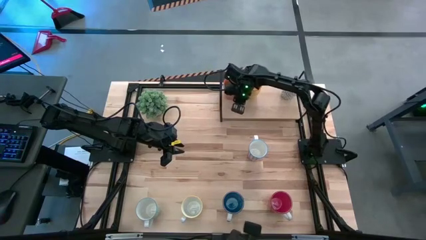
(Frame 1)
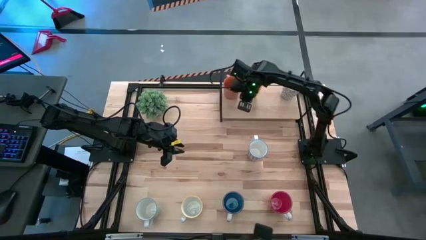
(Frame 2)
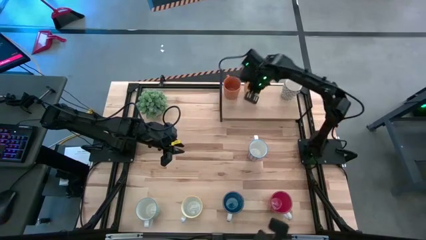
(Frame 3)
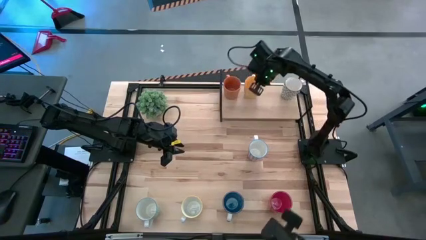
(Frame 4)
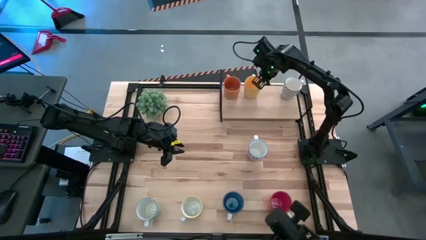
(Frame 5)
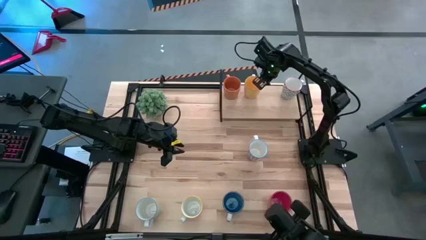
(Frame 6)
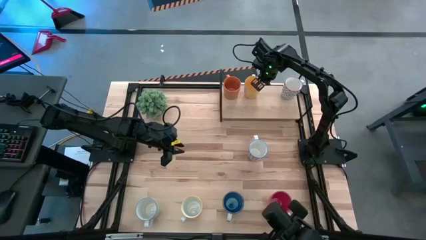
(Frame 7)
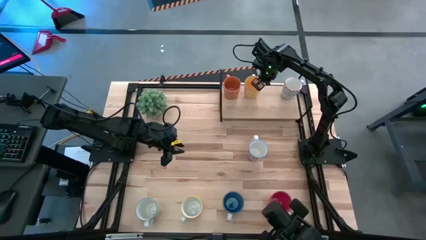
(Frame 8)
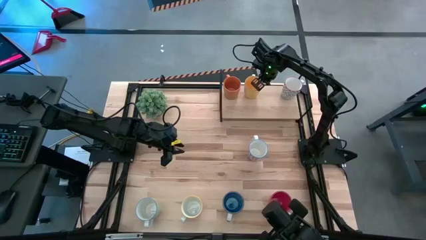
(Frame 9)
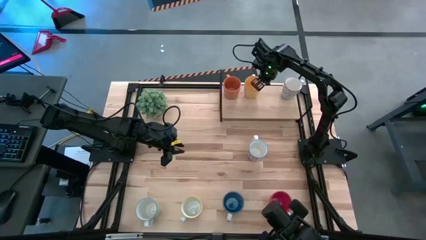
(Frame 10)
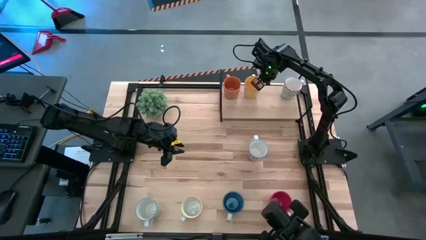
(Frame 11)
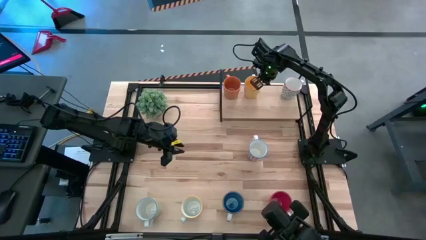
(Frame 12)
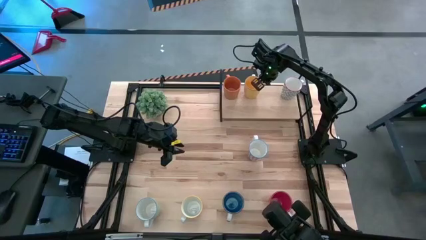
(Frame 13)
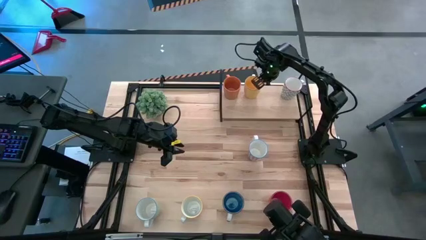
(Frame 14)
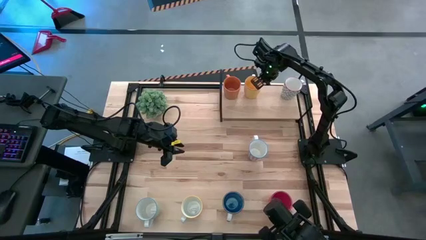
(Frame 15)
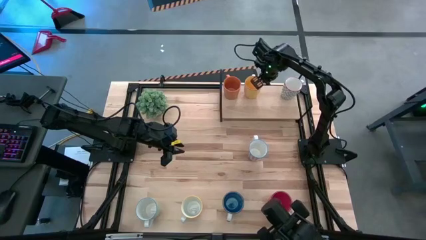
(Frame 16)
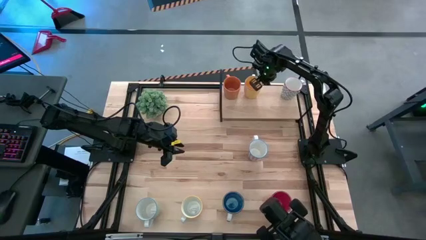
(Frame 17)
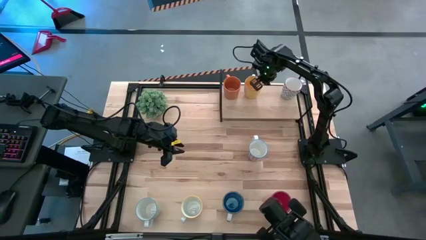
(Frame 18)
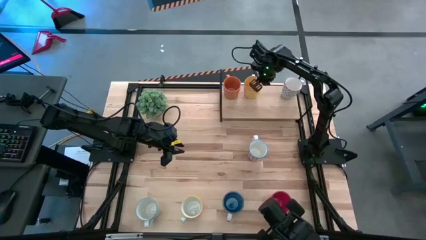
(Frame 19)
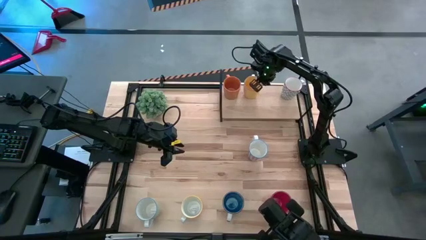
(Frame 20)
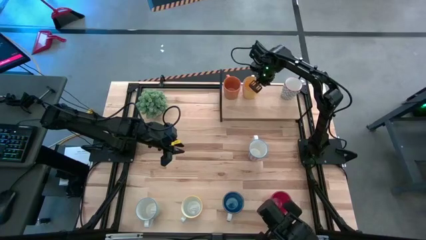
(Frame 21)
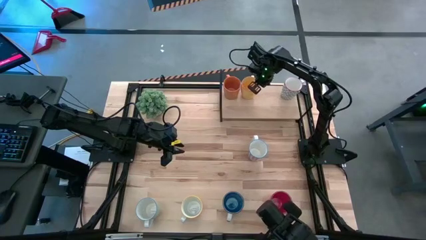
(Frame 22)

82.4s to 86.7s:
Task: Place coffee mugs
Adjust the yellow mug

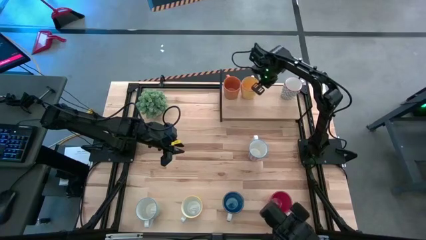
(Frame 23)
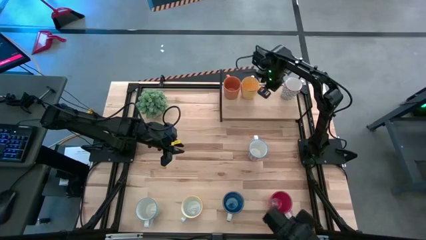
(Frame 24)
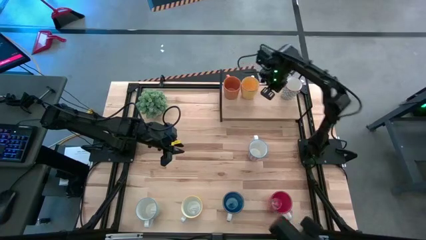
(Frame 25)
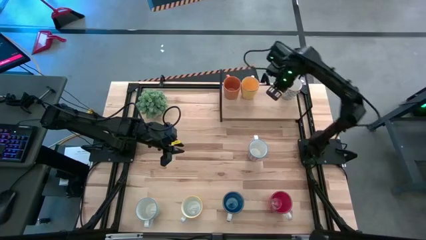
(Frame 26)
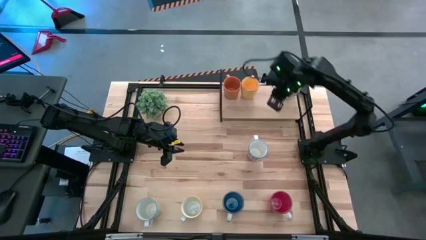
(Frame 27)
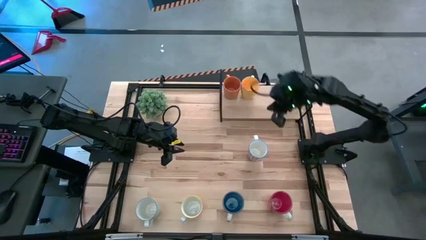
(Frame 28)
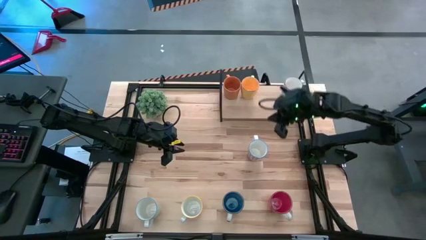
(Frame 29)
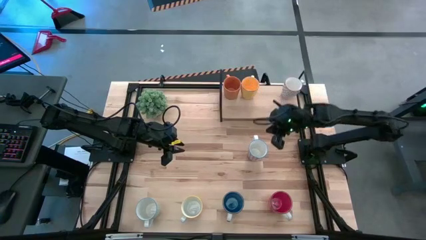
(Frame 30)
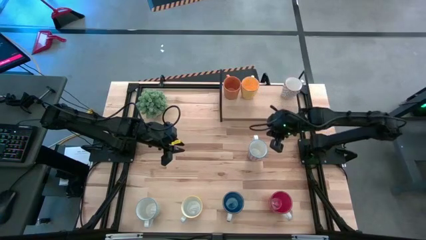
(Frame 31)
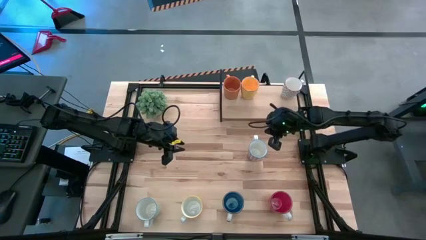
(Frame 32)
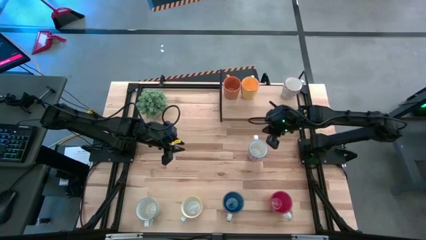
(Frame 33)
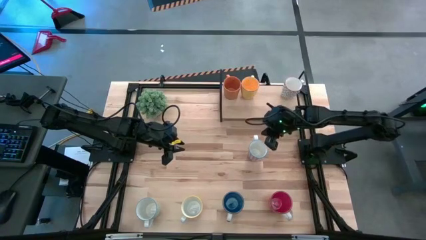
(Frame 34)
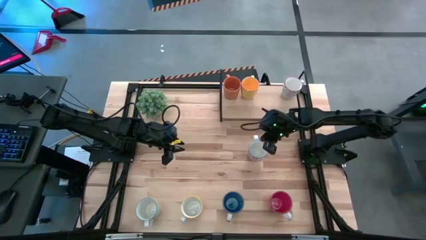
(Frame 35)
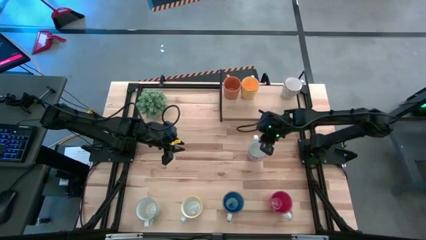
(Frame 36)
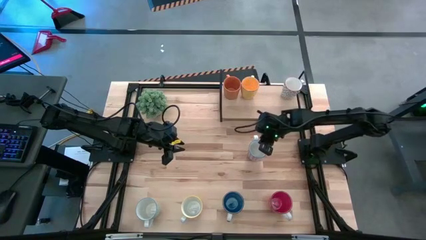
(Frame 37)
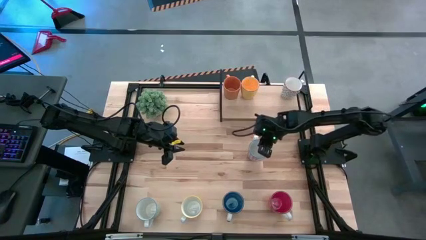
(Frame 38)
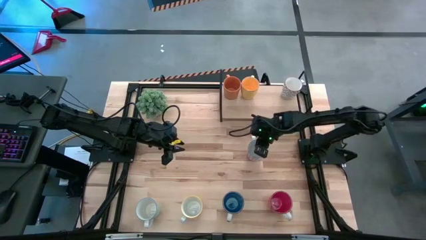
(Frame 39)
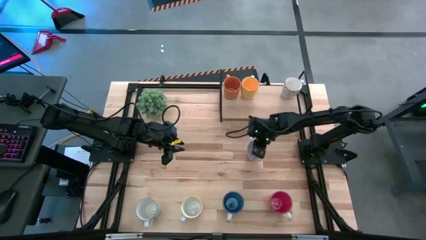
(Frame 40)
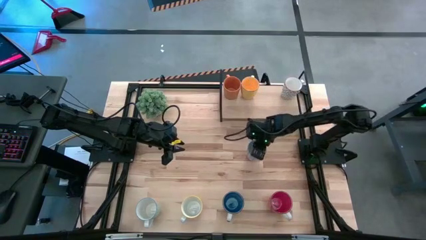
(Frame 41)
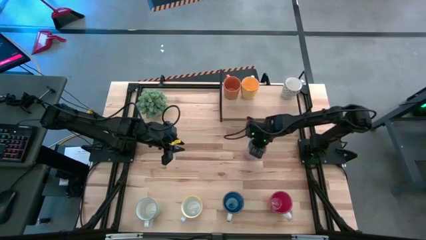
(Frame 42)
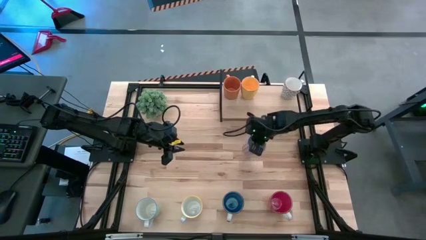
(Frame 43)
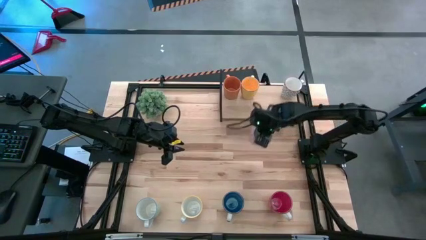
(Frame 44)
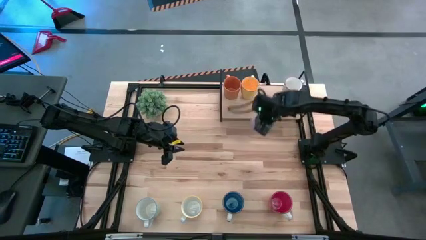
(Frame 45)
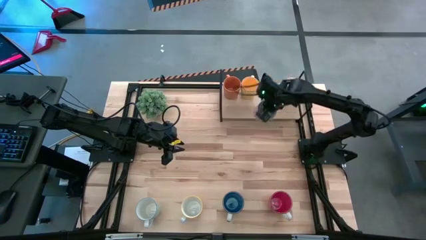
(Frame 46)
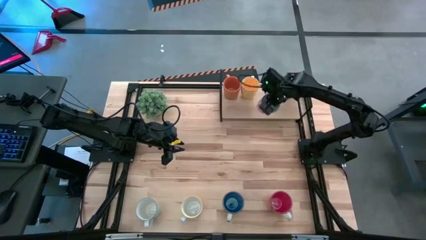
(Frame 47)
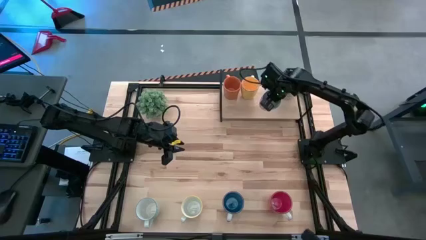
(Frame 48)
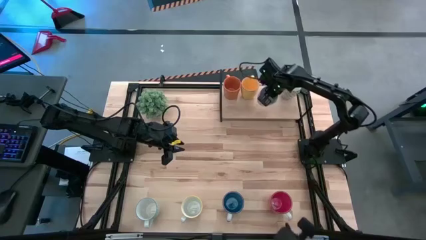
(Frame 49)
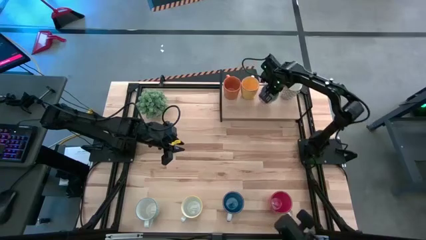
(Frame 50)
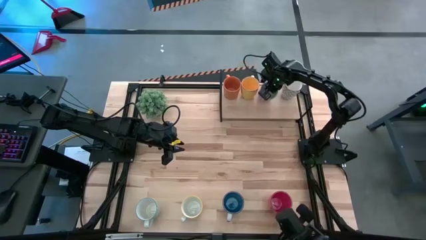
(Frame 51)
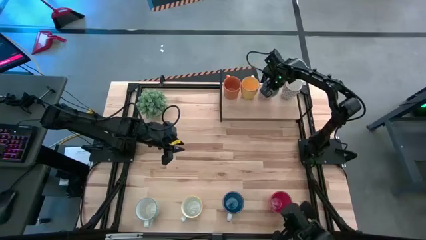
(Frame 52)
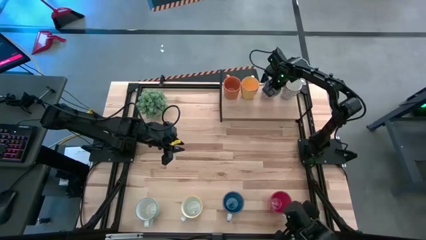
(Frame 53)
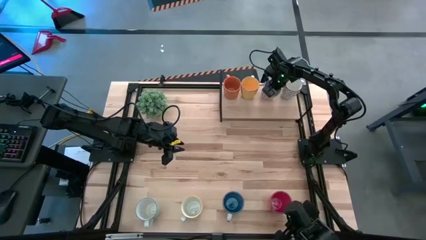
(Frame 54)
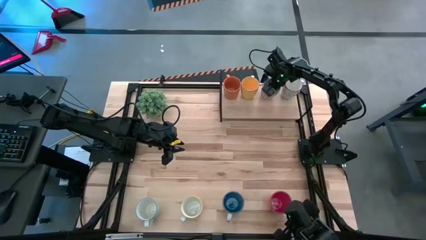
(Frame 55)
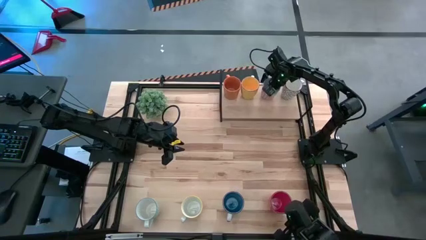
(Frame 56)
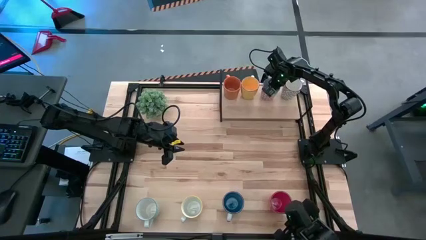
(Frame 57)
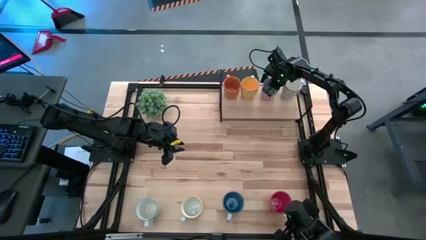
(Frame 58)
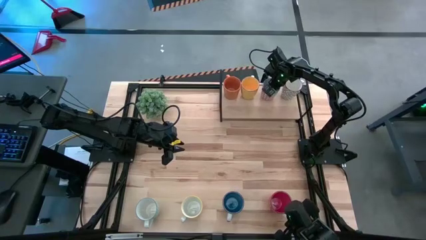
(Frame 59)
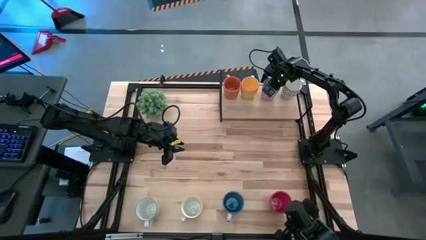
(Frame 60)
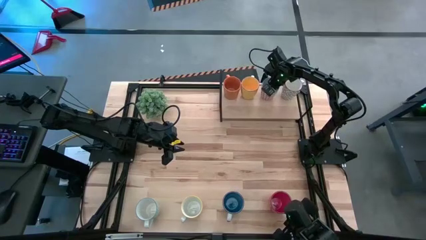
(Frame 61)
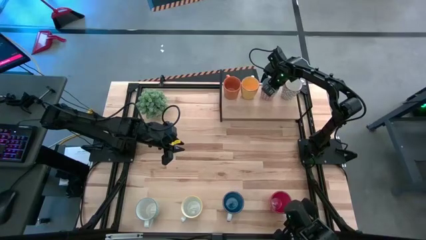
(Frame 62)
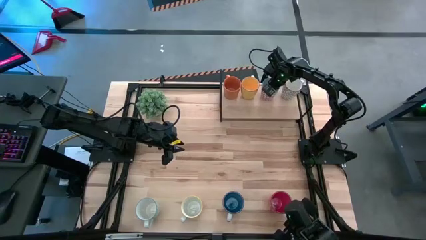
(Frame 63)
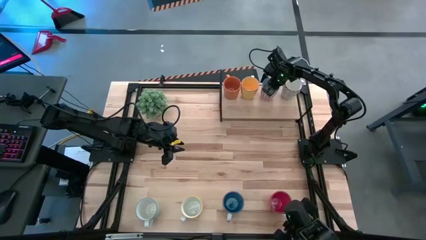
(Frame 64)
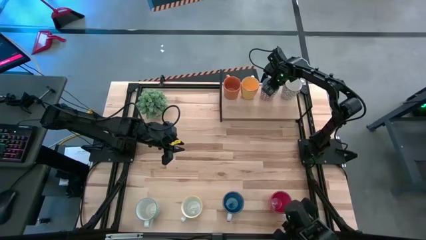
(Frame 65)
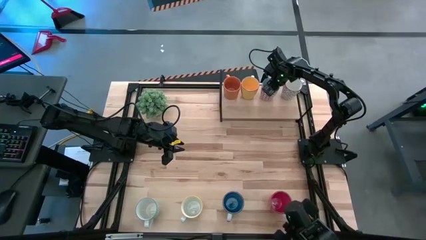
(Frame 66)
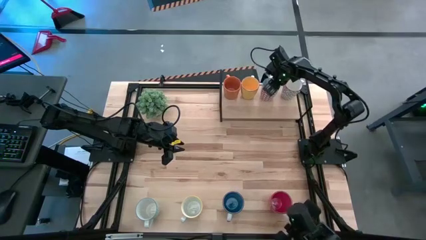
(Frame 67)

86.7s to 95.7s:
Put the red patterned mug on the shelf

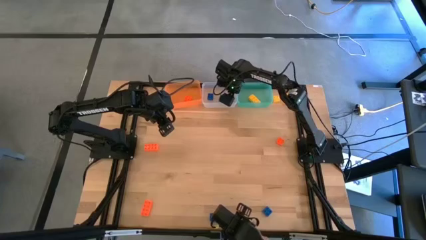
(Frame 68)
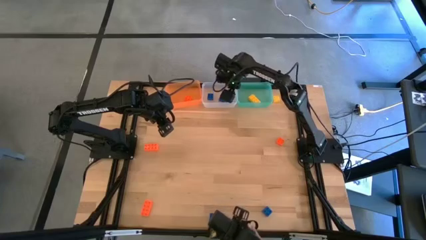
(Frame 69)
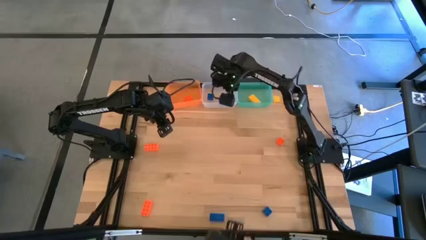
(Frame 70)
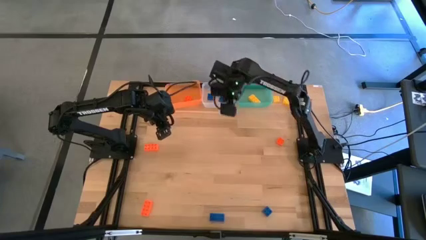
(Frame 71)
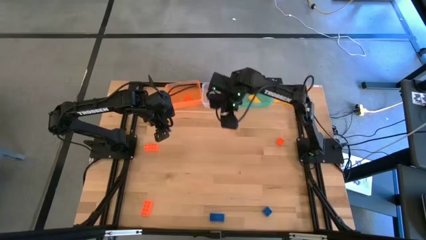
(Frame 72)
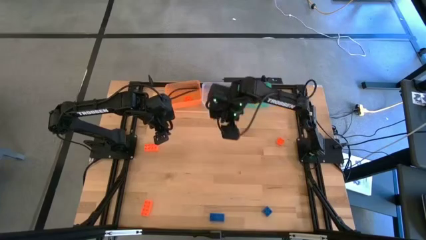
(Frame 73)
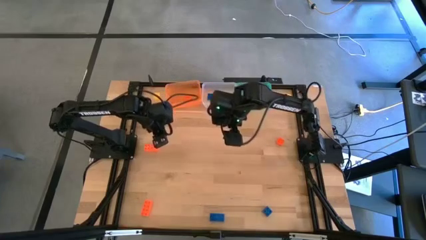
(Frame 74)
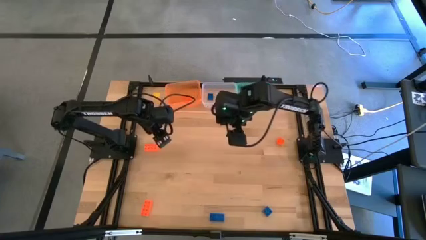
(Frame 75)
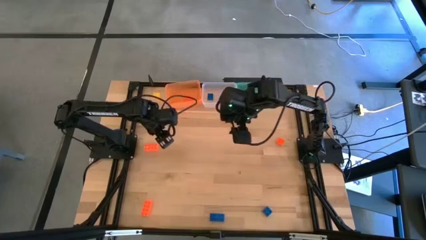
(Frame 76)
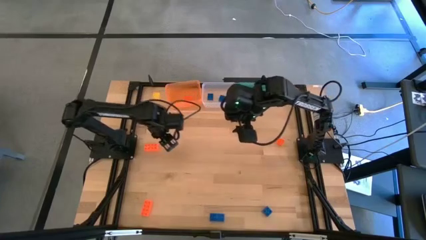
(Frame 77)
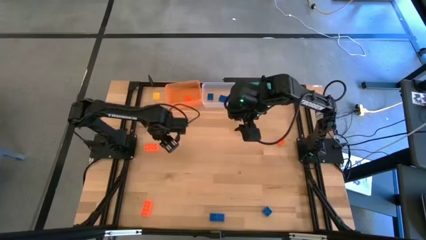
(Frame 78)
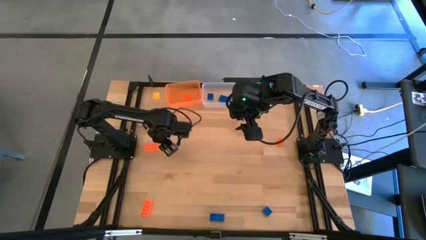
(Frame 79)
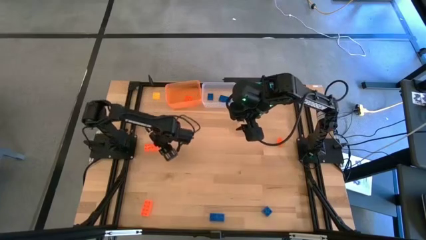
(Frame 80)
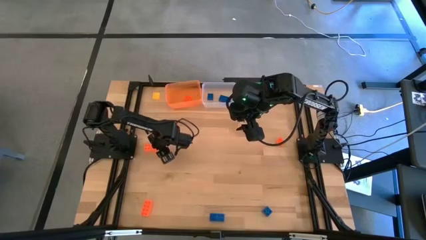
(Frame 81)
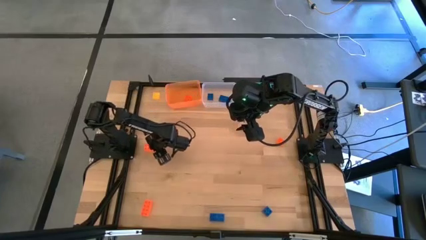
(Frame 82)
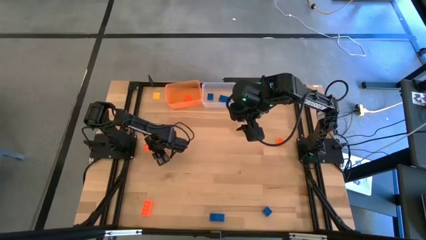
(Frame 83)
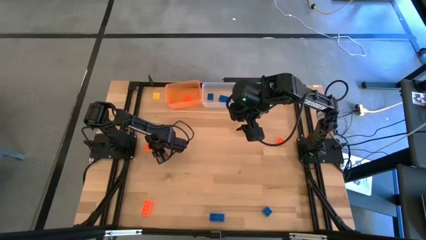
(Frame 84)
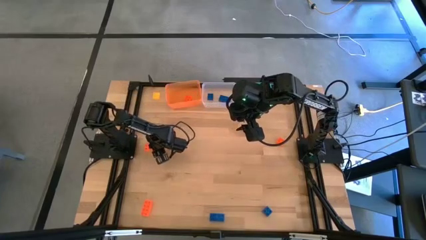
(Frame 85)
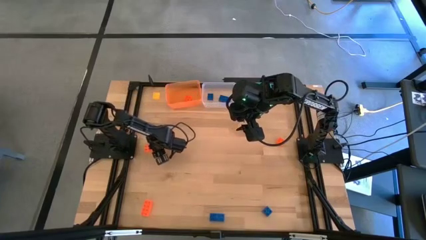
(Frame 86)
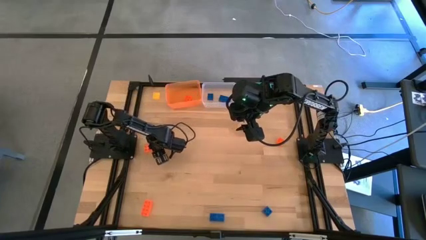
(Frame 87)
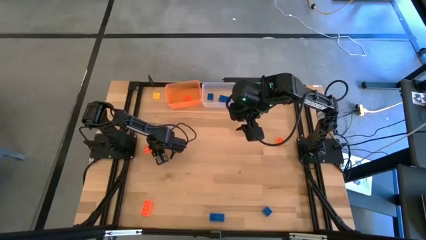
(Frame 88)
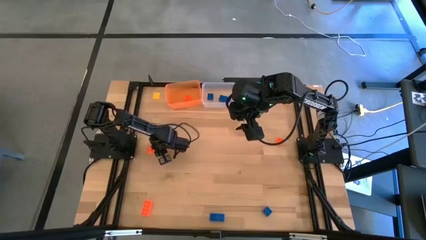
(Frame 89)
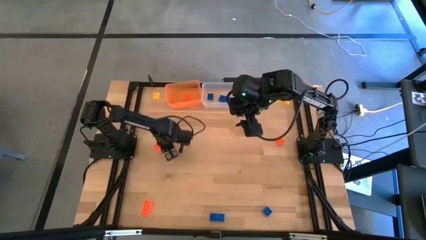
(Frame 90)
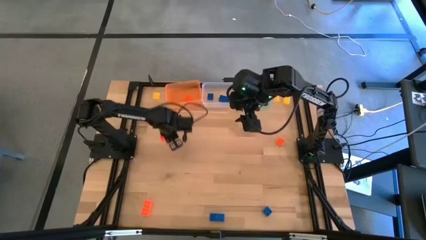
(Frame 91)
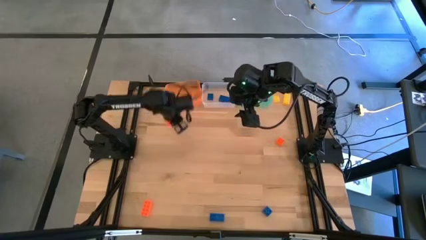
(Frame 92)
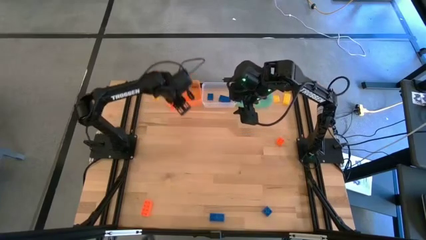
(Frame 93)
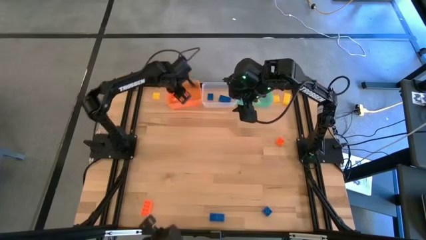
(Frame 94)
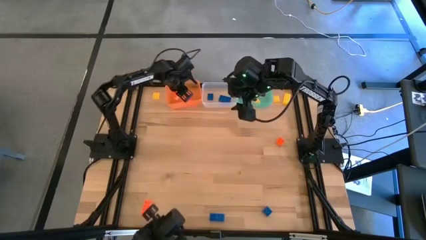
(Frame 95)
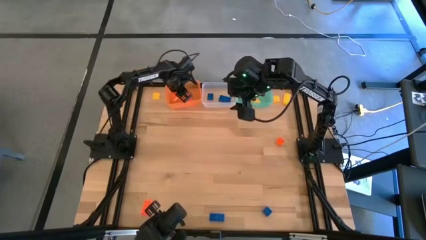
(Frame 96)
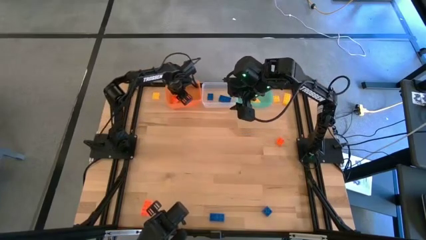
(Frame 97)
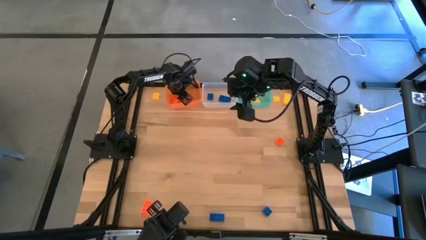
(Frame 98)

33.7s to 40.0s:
Task: Sort & place blocks by color
Put the orange game piece into the orange bin
